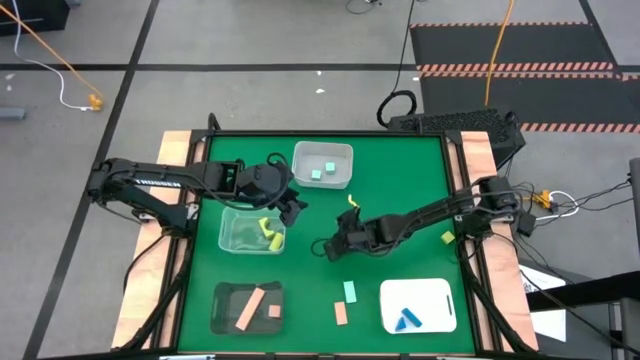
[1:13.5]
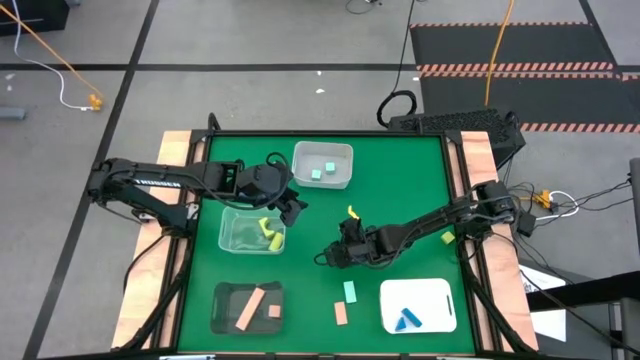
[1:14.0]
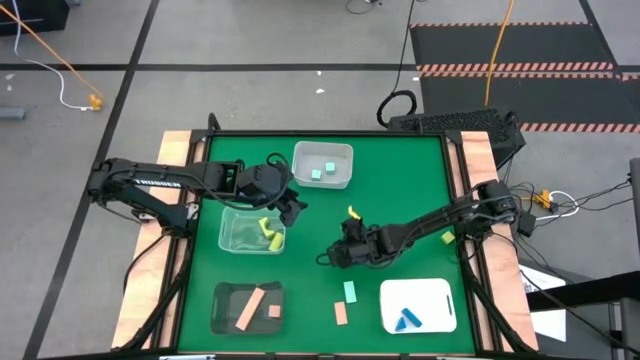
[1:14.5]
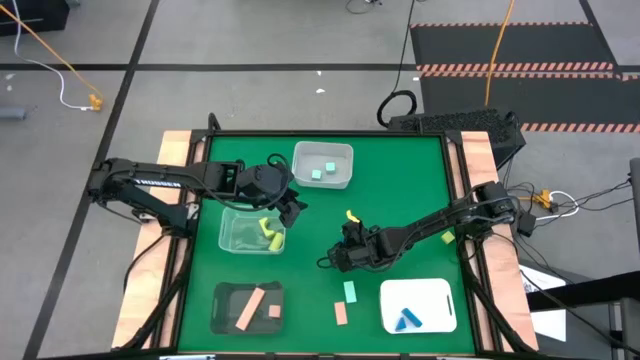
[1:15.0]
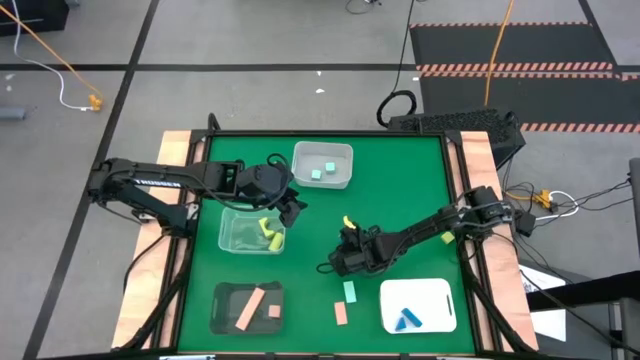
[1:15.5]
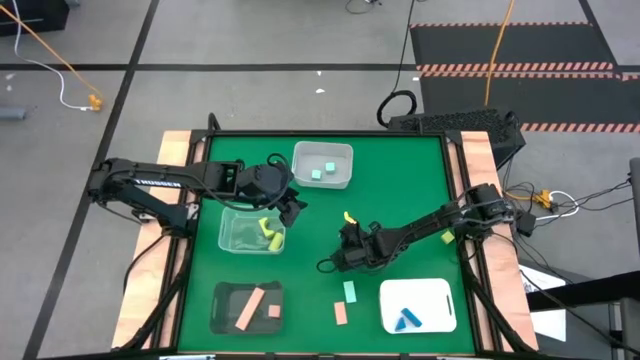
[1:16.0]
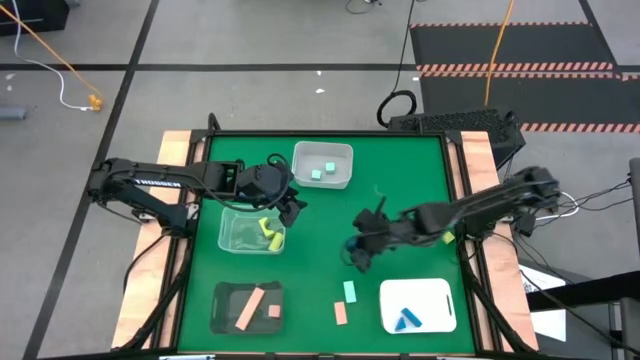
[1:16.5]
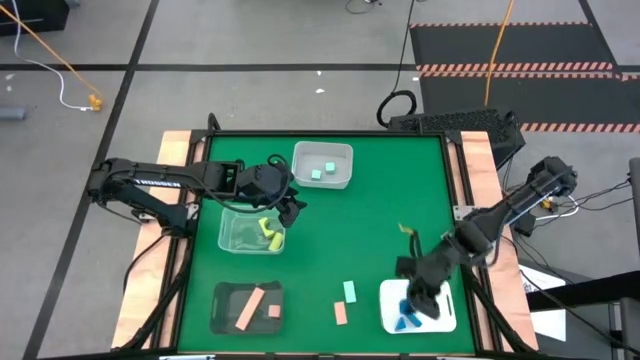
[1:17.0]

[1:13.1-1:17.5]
Task: Sort & place blocks by color
Put the blue block into the bottom white bin

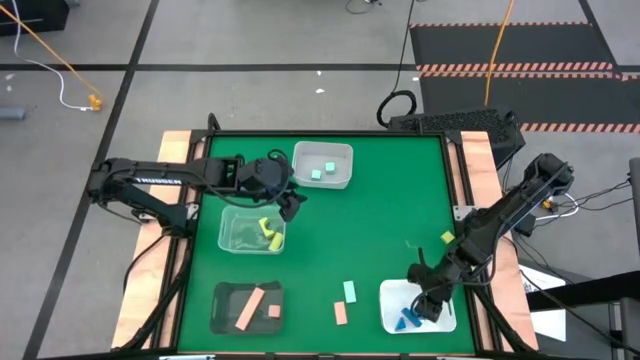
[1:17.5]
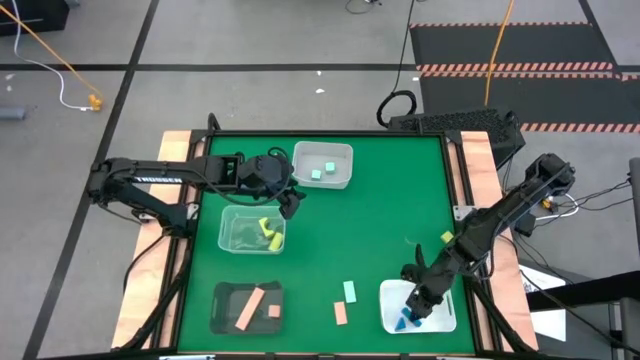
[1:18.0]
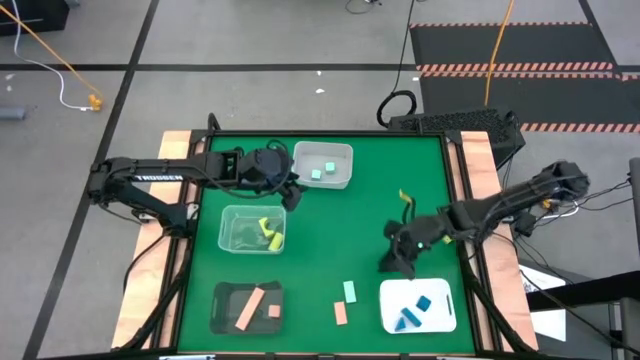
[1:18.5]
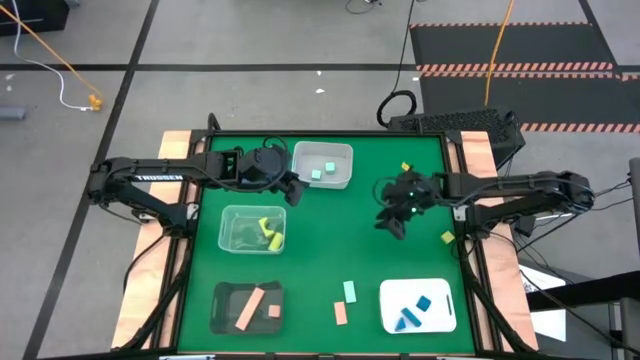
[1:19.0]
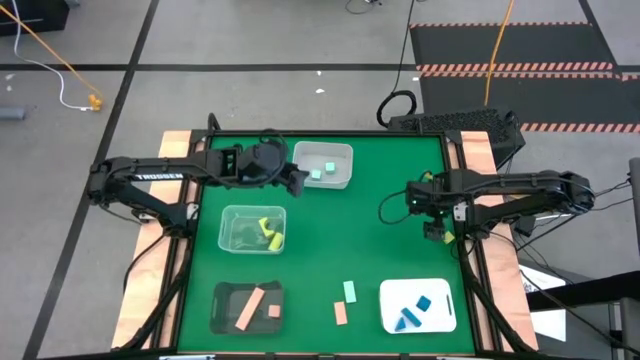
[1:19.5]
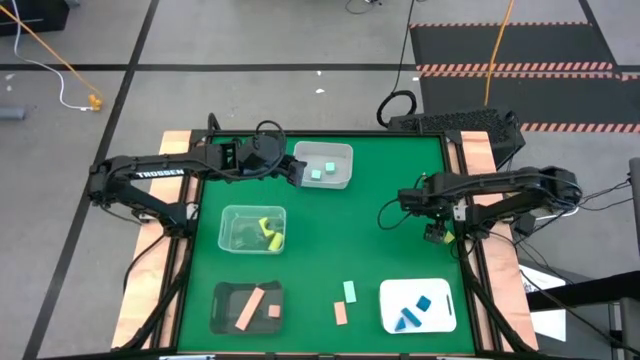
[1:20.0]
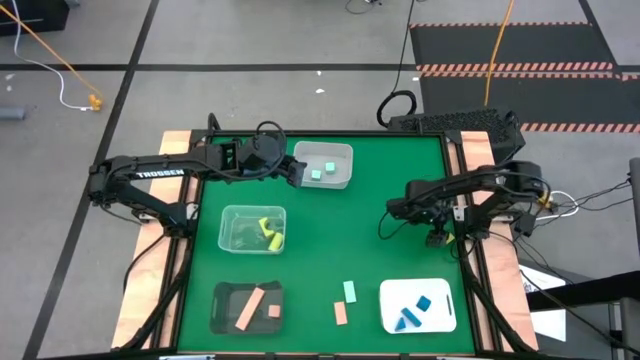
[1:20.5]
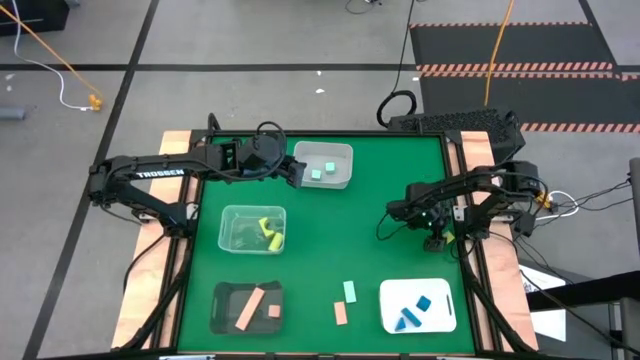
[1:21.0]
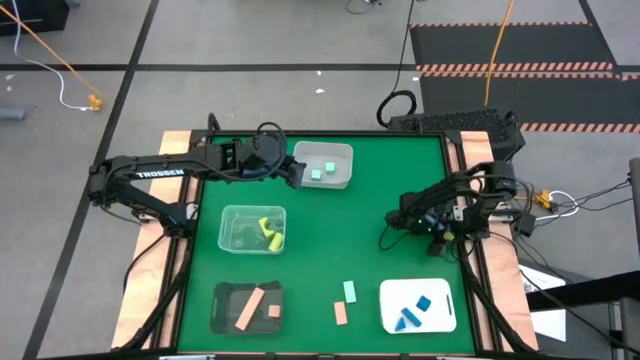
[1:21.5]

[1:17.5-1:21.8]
Put the yellow square block into the transparent bin

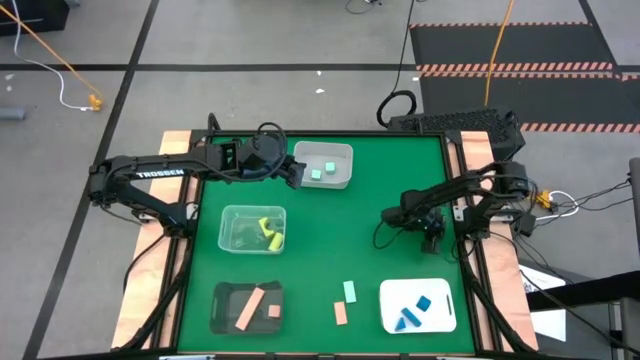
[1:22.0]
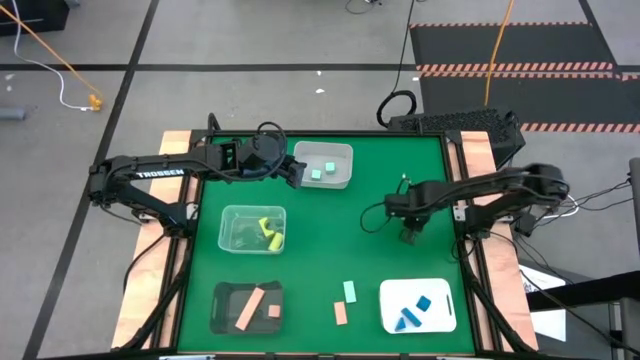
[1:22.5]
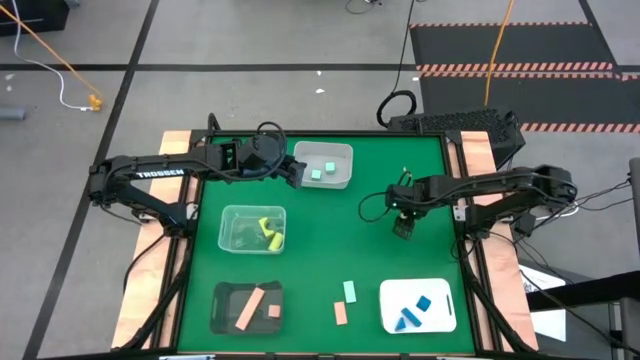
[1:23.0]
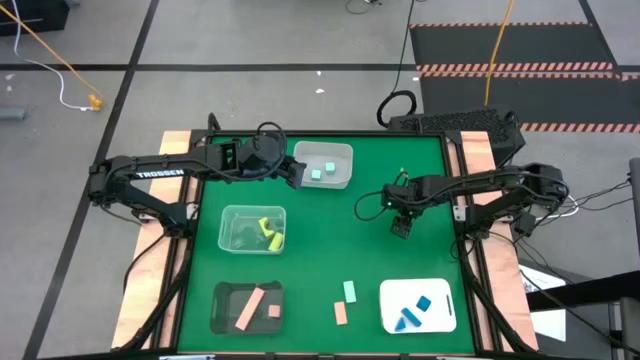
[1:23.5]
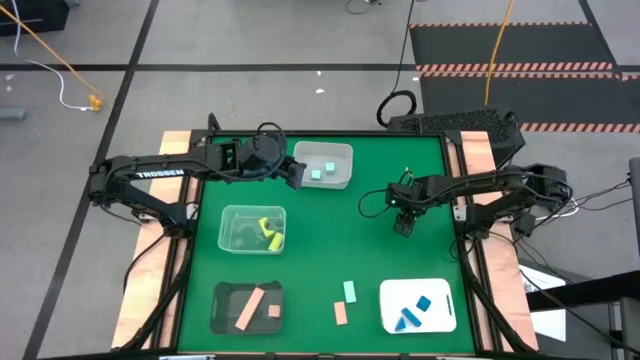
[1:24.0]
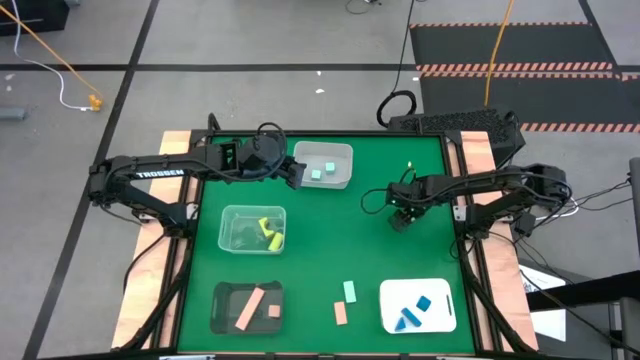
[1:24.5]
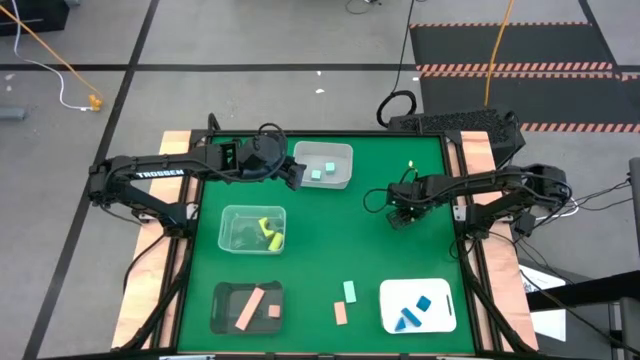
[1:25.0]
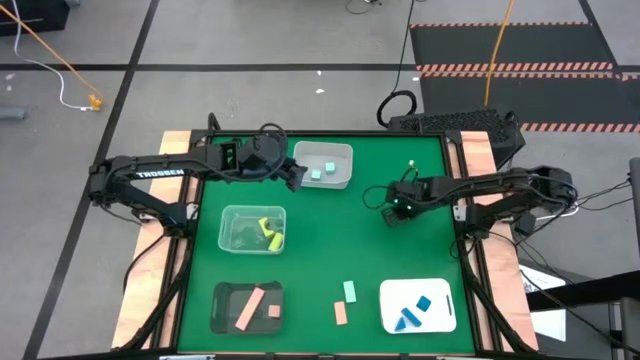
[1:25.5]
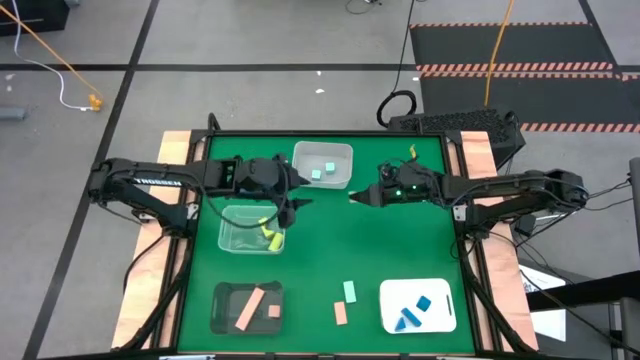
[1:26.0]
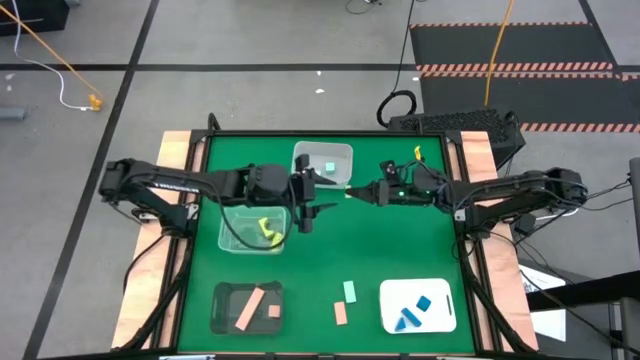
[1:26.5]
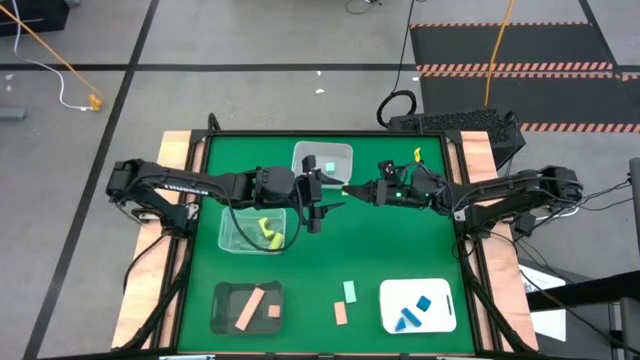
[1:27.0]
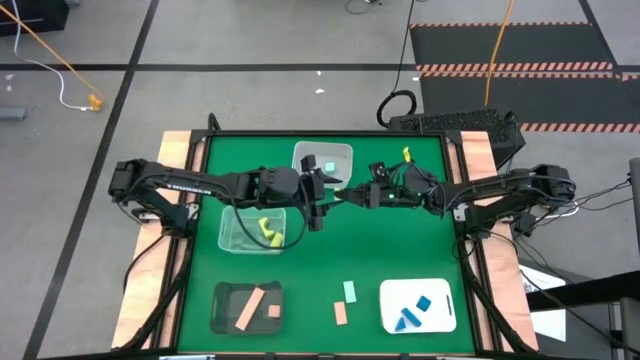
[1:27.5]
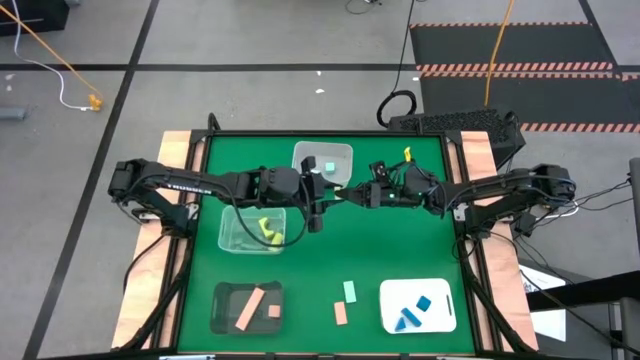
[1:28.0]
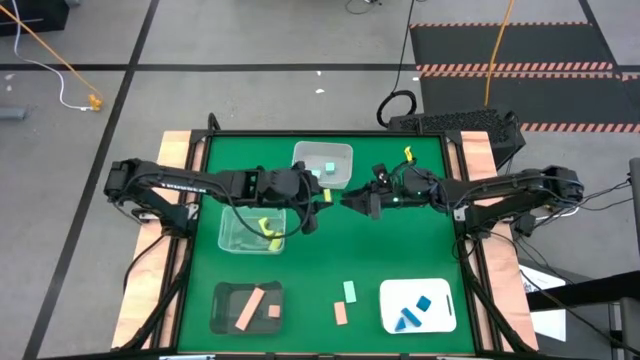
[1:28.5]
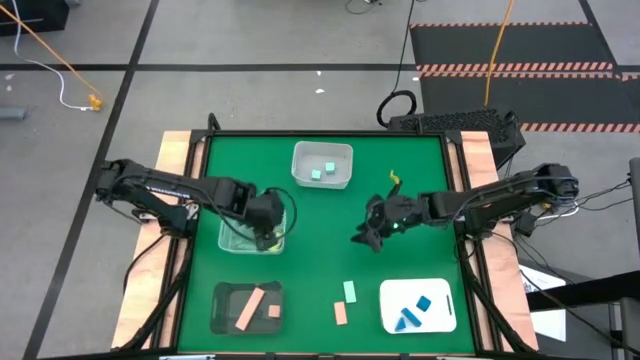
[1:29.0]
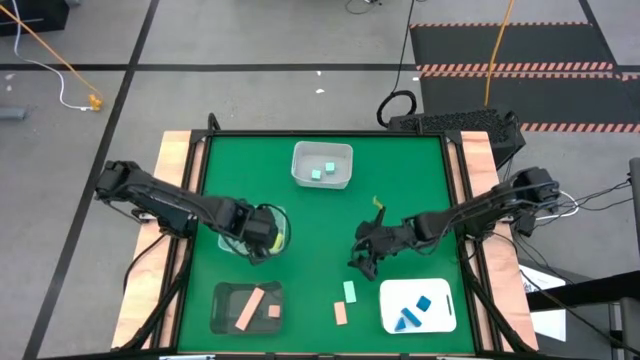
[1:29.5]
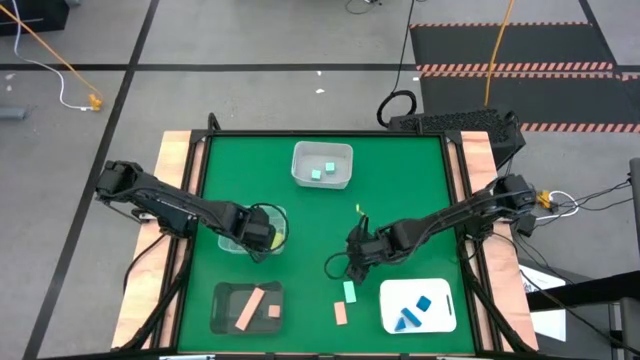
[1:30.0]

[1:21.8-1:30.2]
Put the yellow square block into the transparent bin

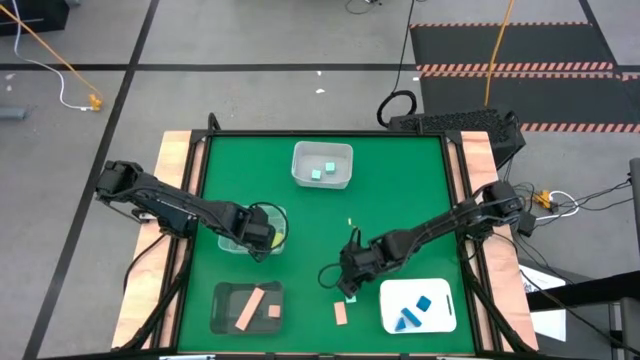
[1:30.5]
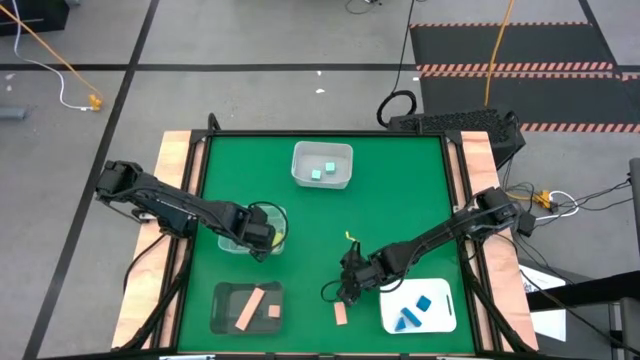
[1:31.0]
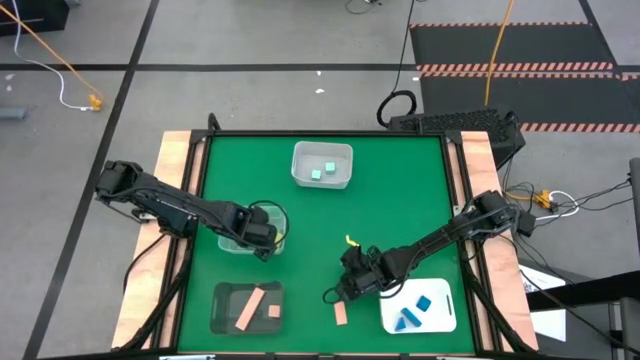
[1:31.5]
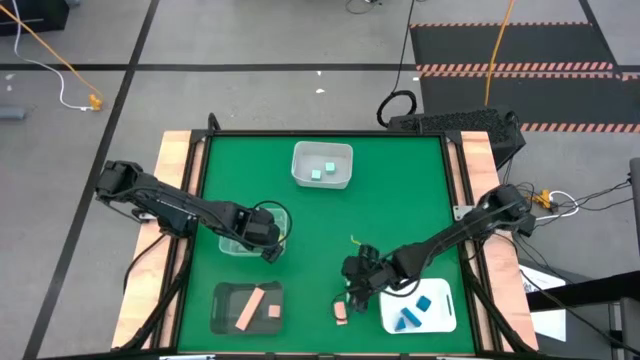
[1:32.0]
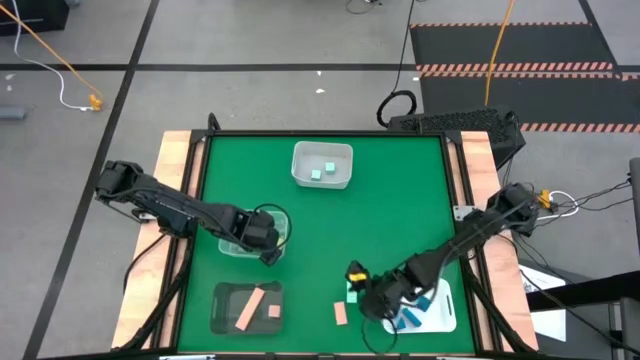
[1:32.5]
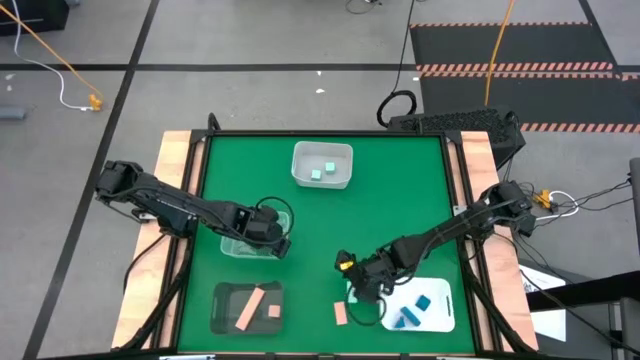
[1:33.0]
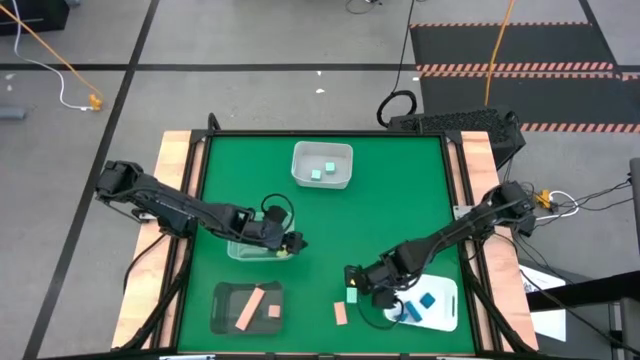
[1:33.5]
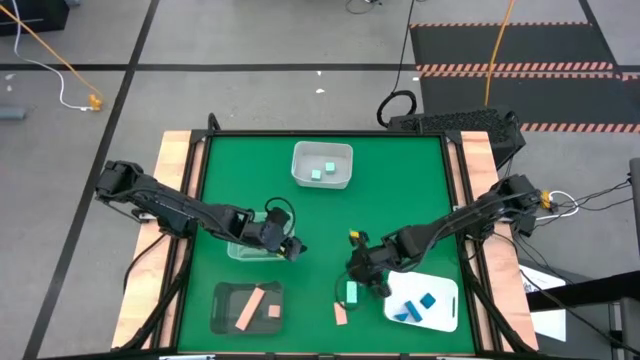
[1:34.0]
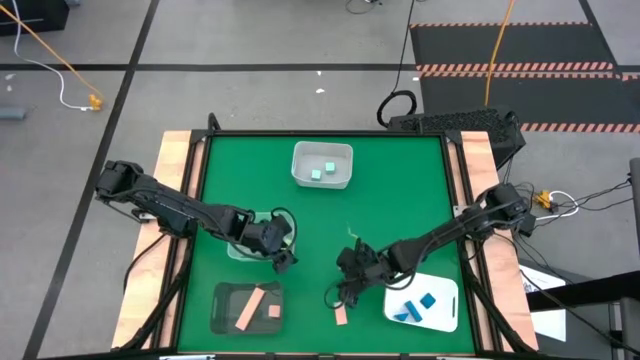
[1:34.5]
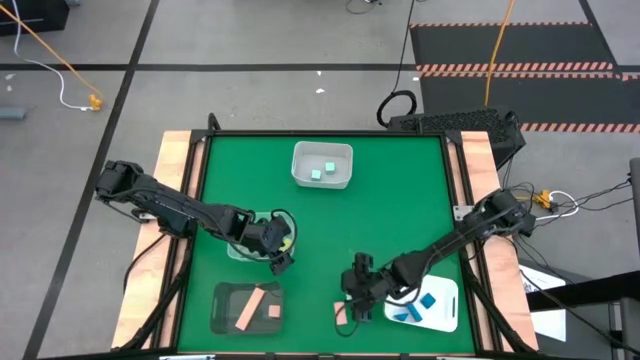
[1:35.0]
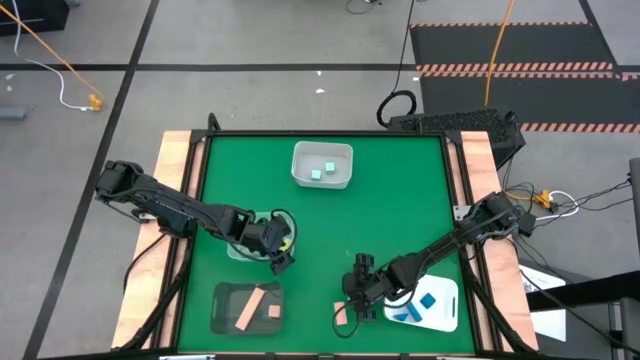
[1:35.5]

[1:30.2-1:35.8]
Put the light blue rectangular block into the top white bin
